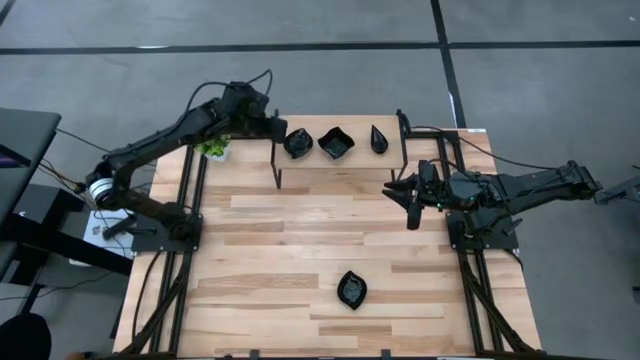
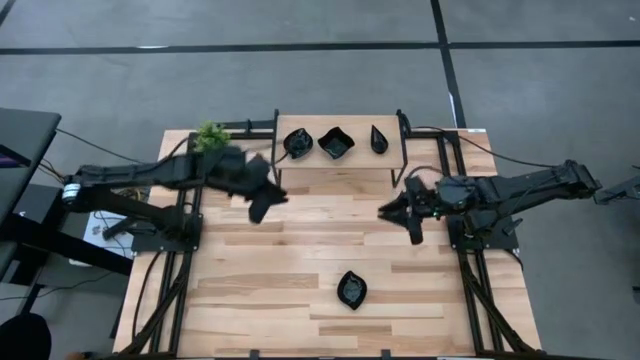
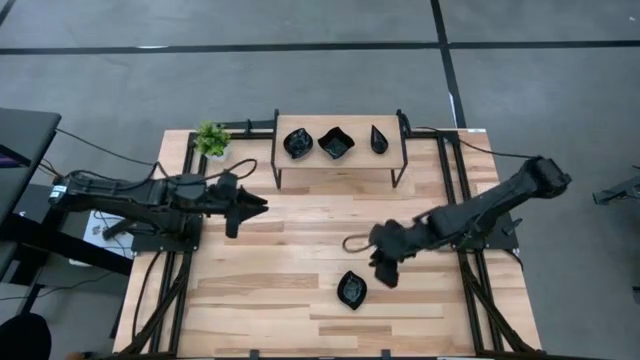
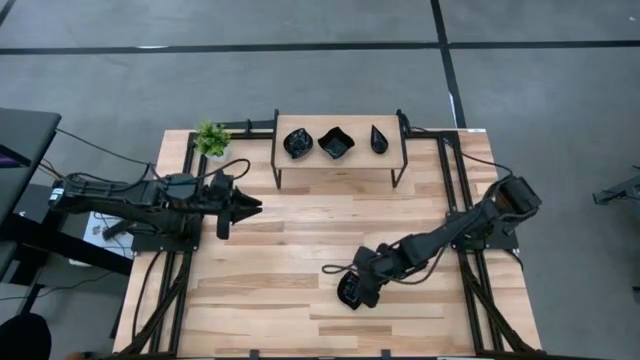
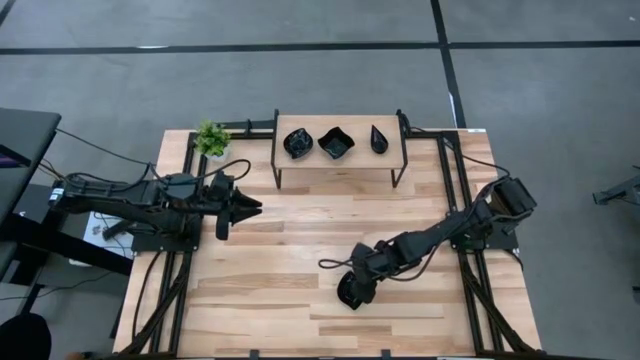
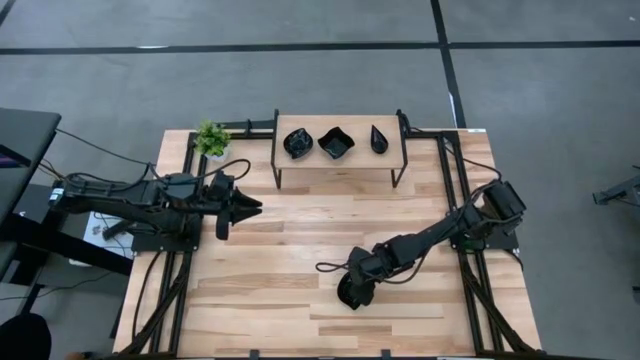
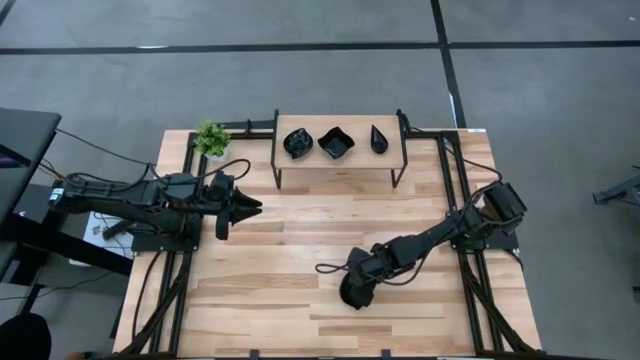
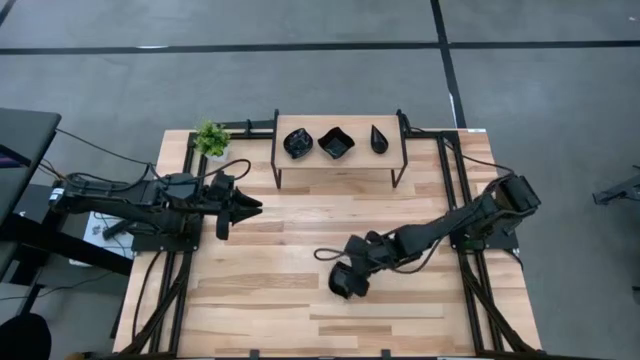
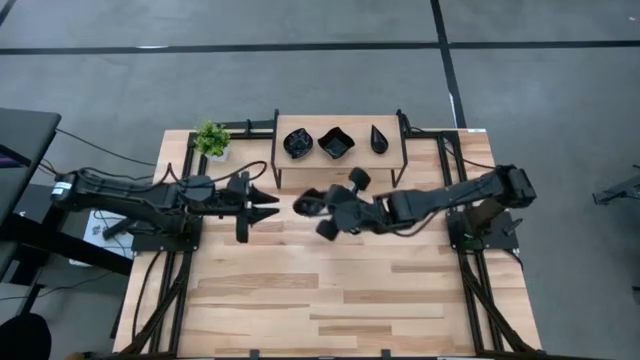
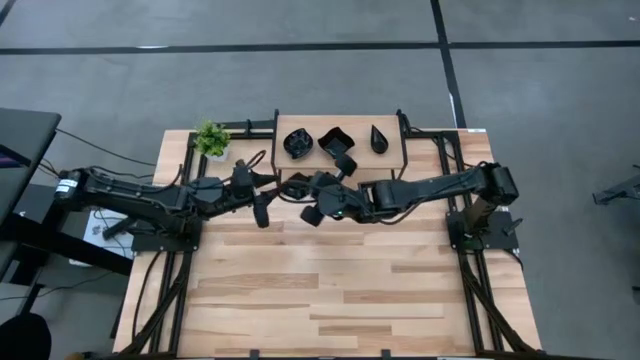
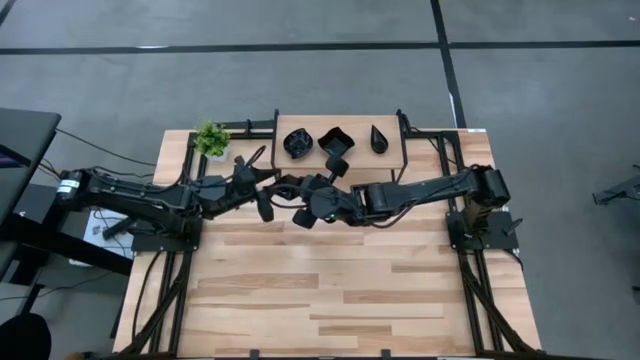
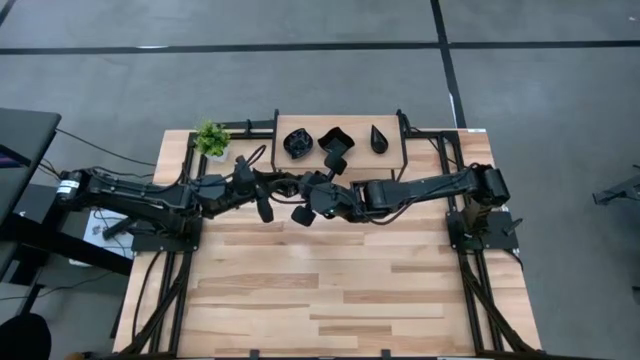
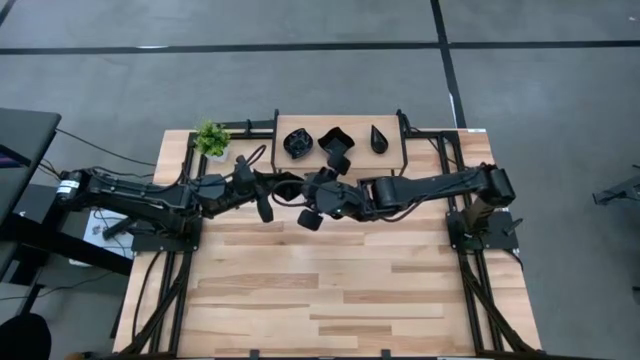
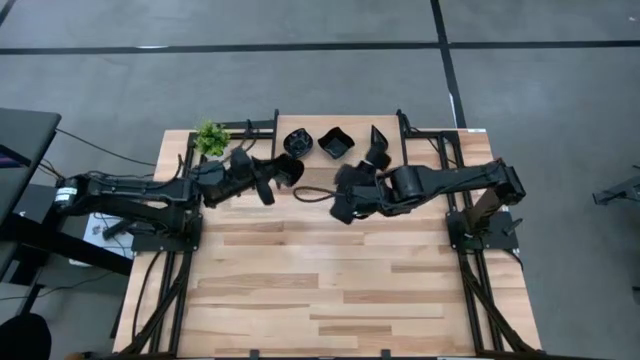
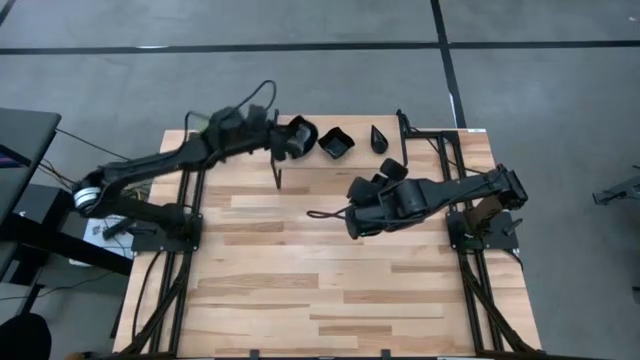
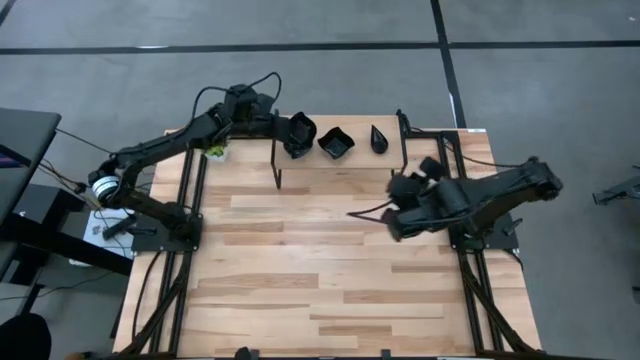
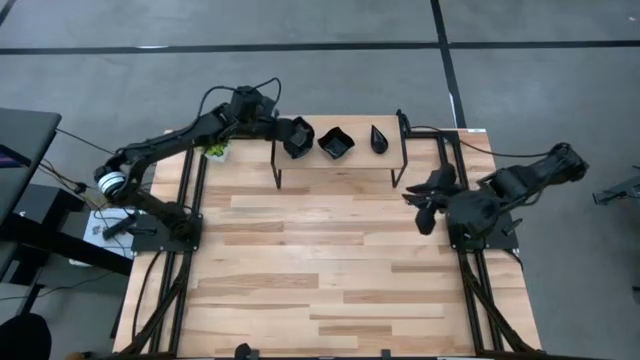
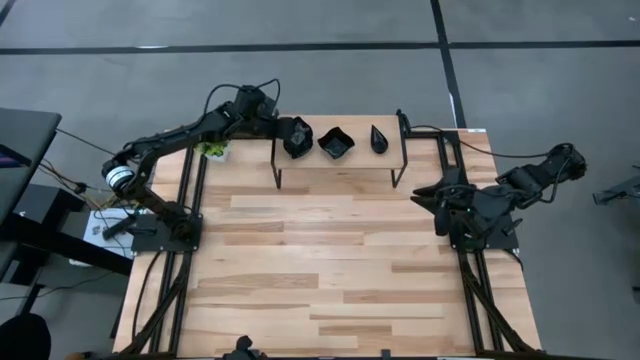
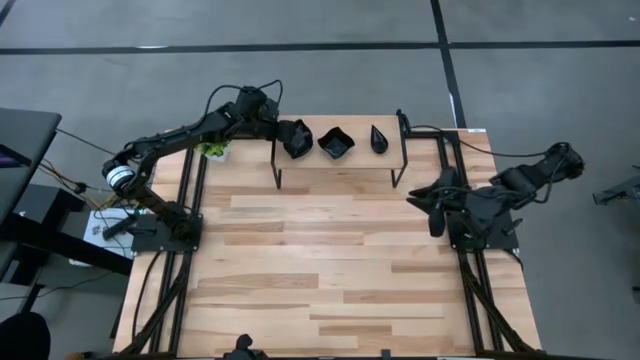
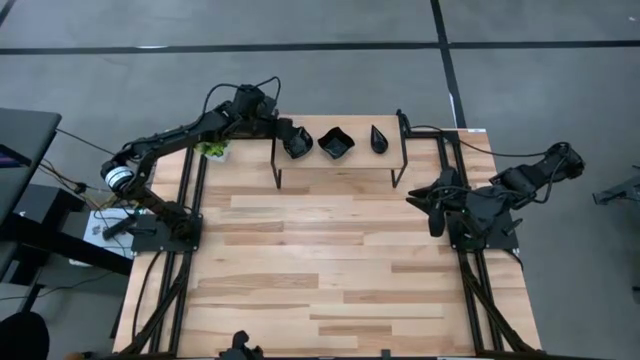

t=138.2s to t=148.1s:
Task: Pick & Place Mini shaped plates
Stack the leaf shaped plate on top of the other leaf shaped plate on the shelf

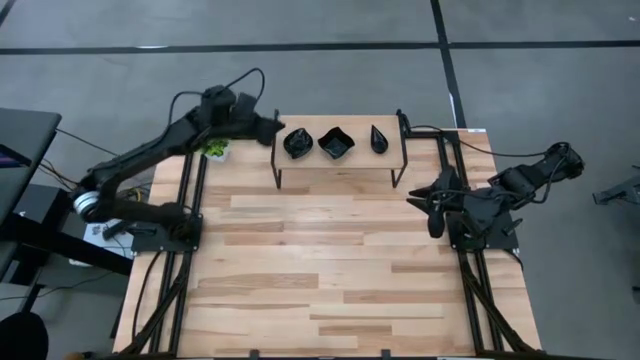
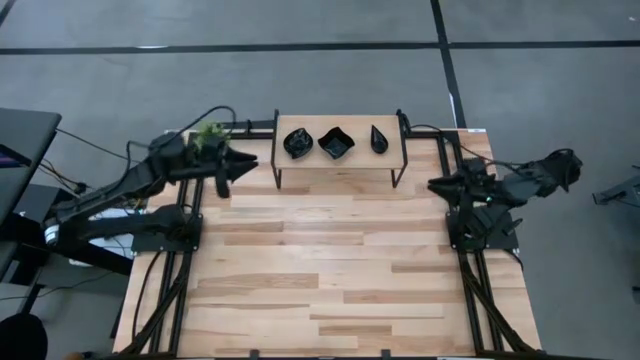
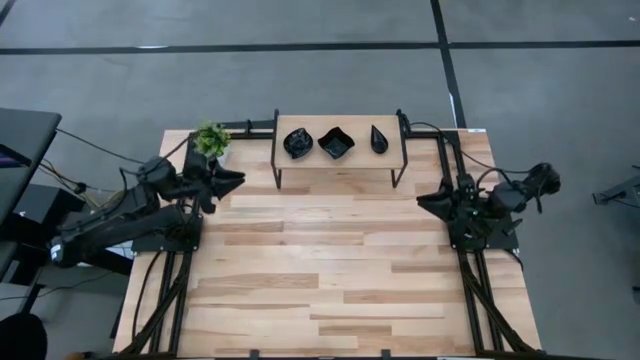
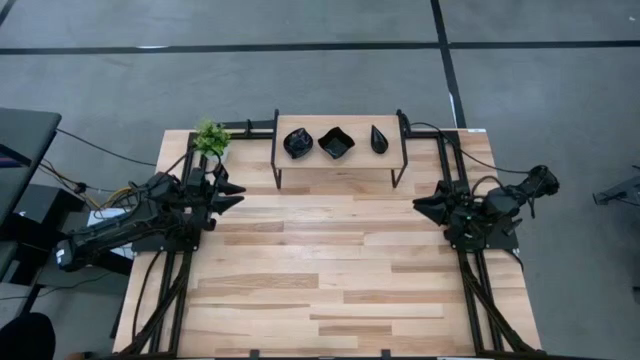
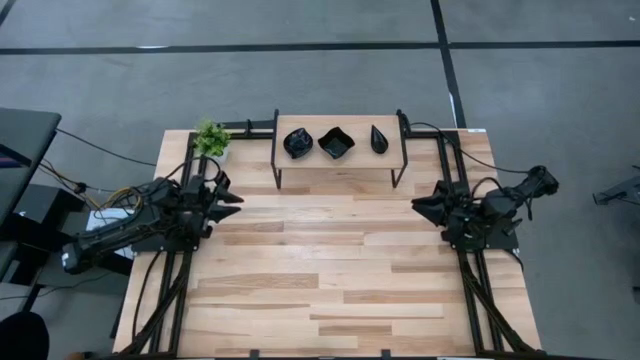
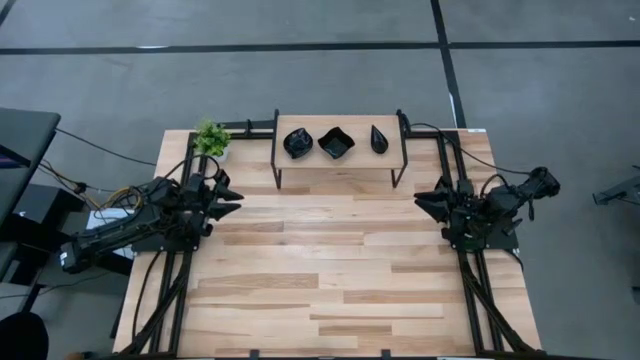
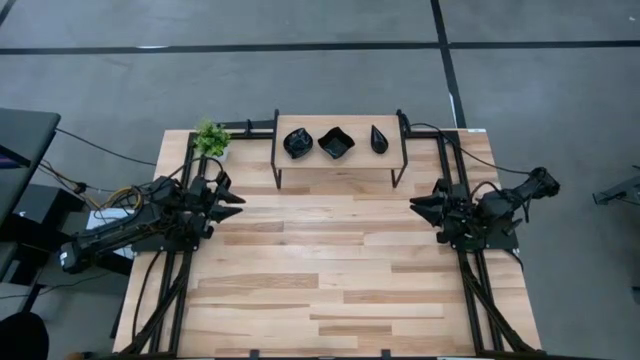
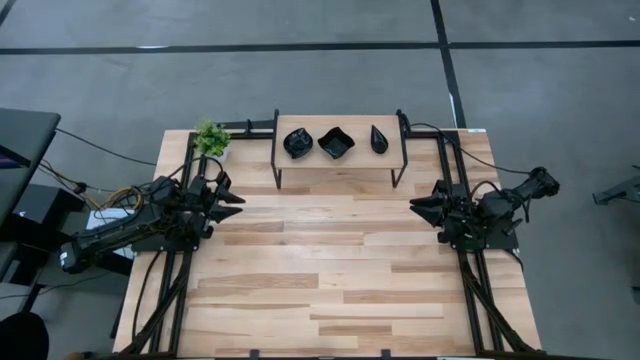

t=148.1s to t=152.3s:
Return to Home Position

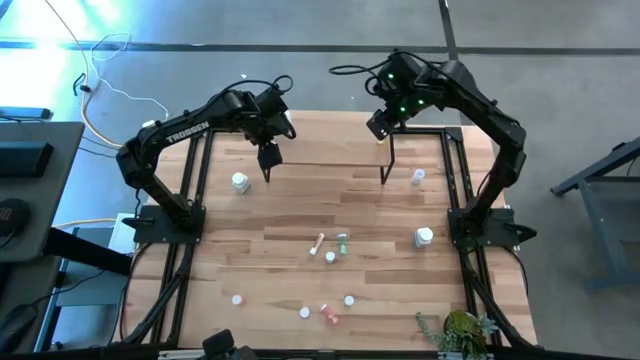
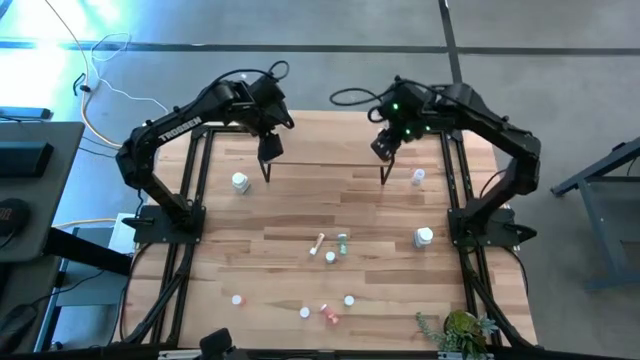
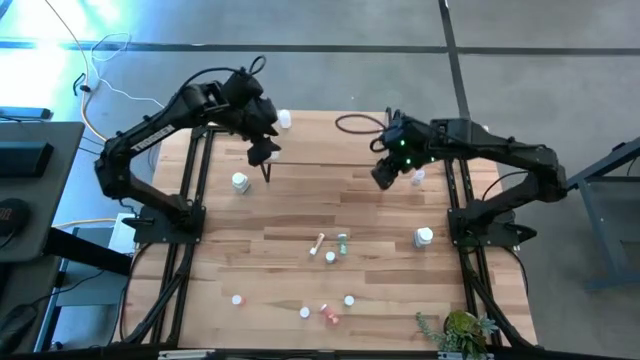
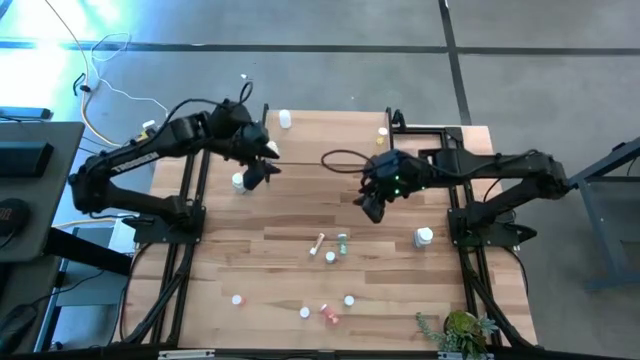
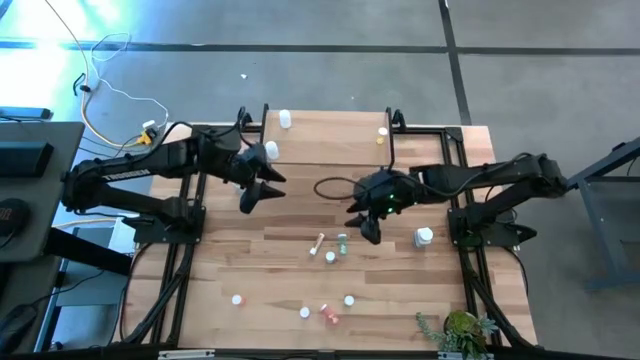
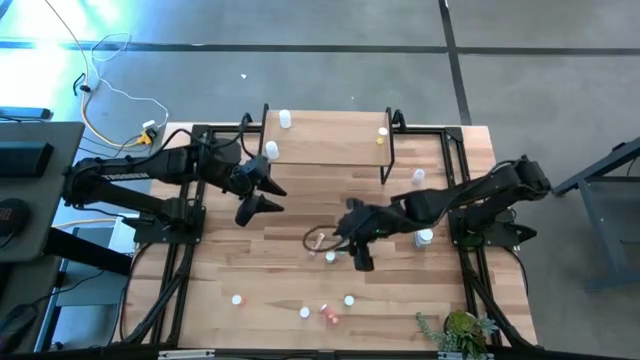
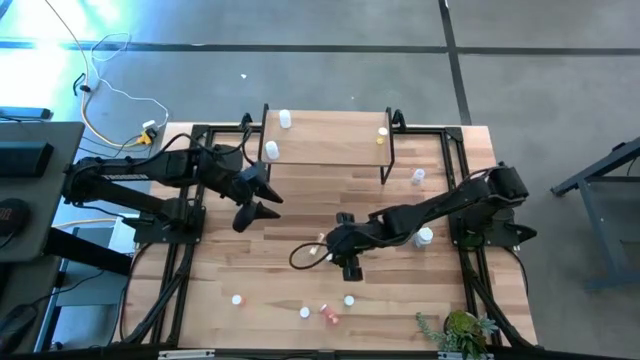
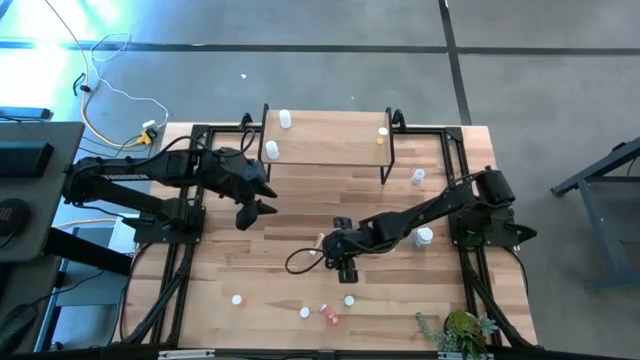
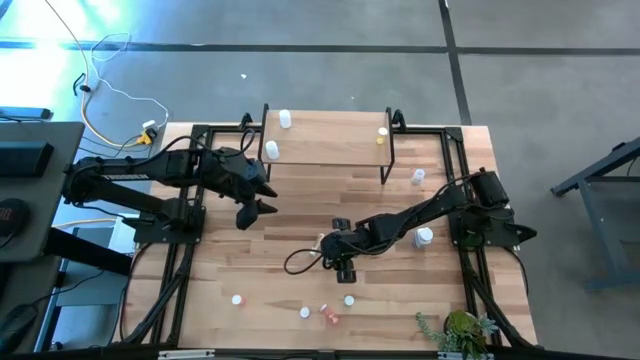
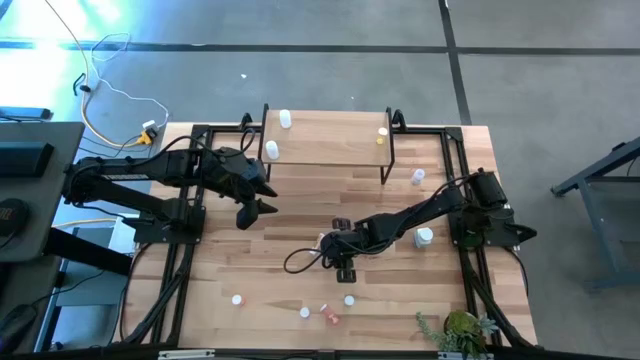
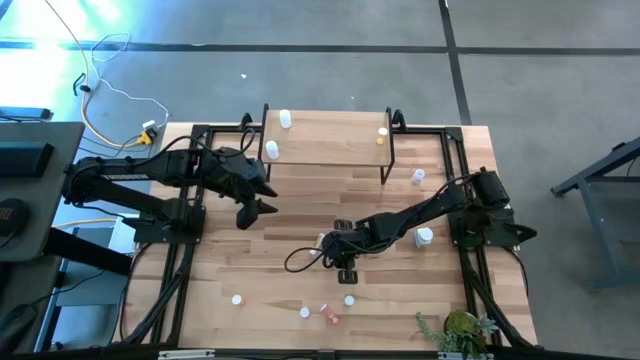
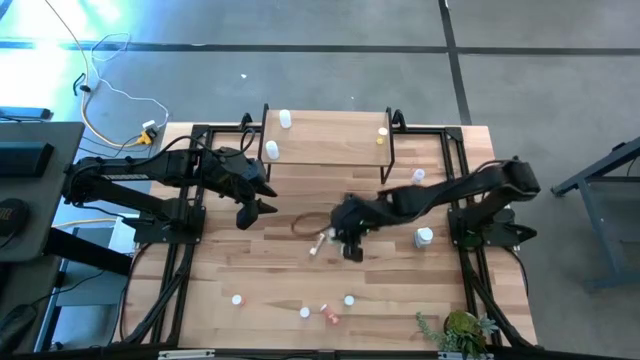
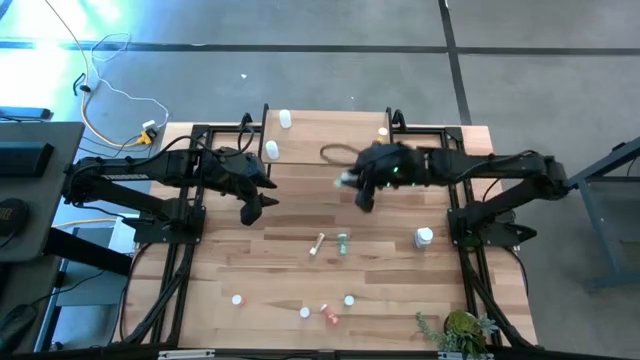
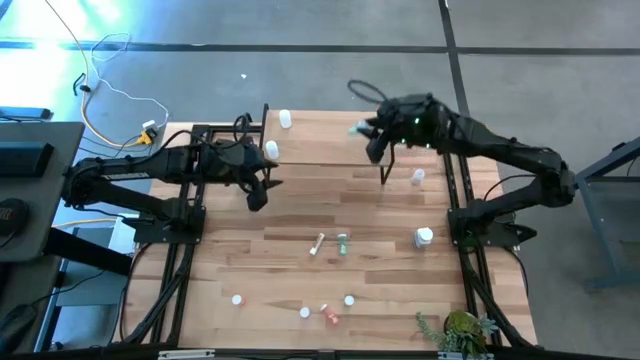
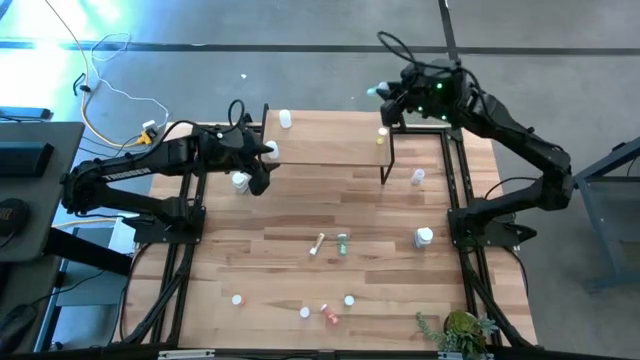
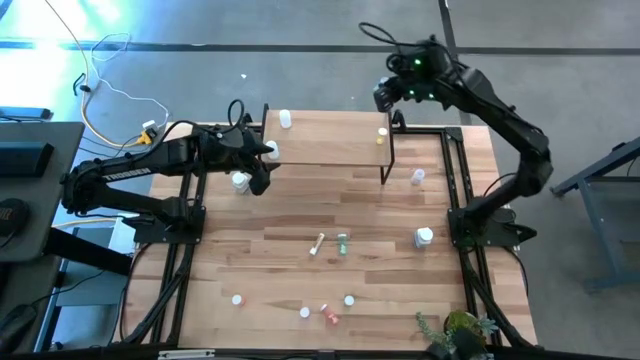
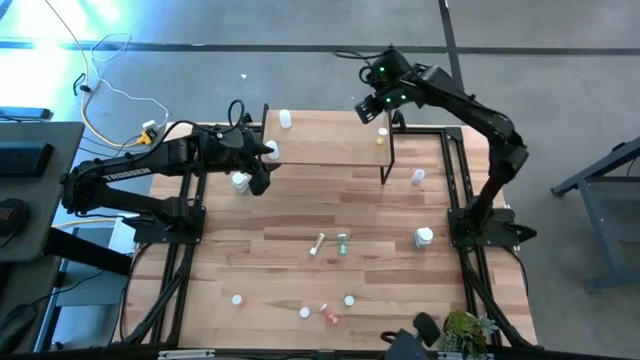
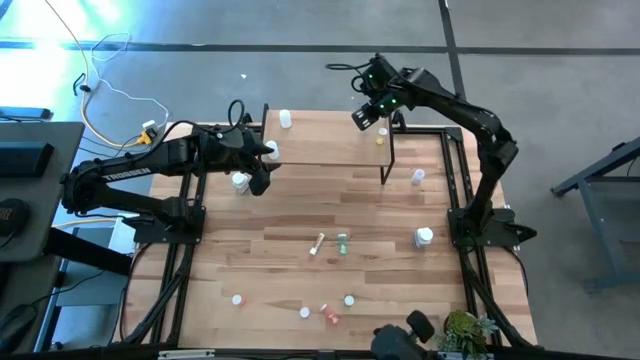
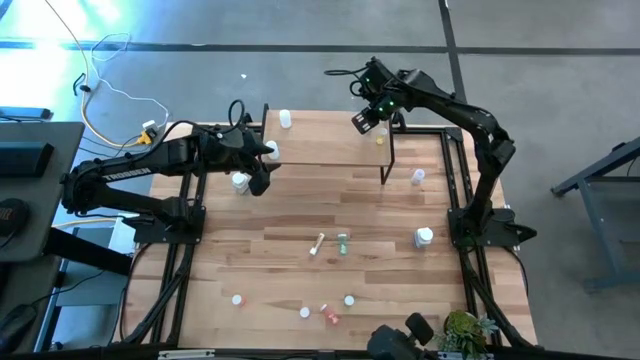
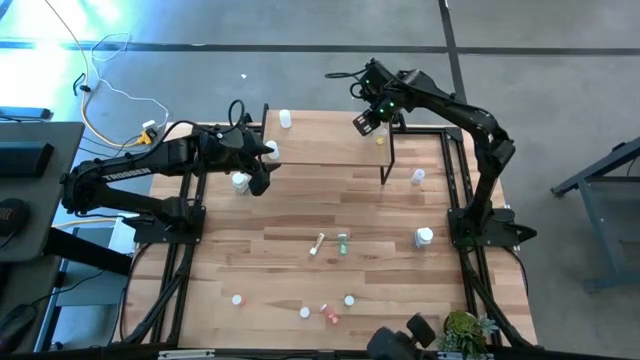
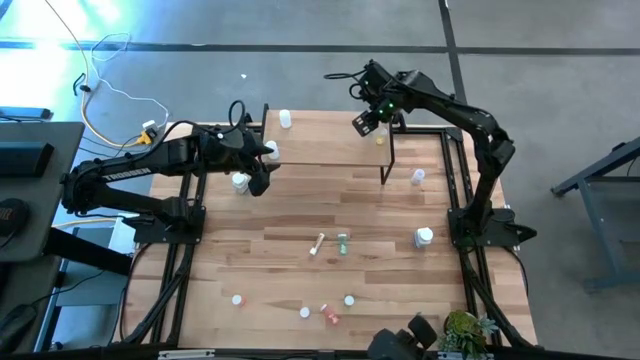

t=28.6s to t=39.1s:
Task: Pick and place medicine bottles onto shelf by color
Put the middle blue pill bottle on the shelf
